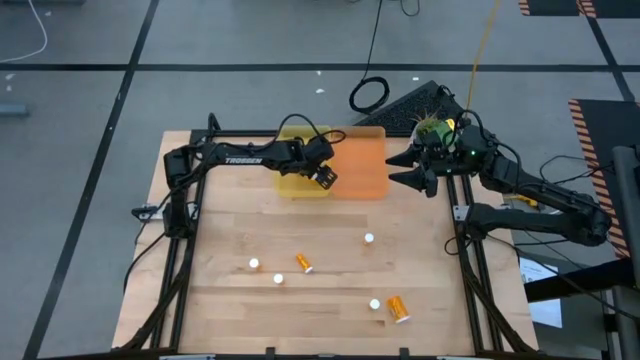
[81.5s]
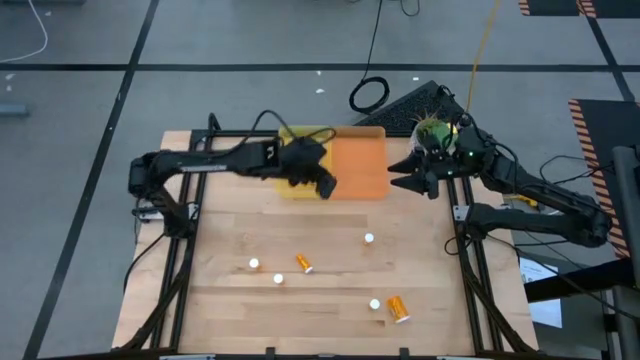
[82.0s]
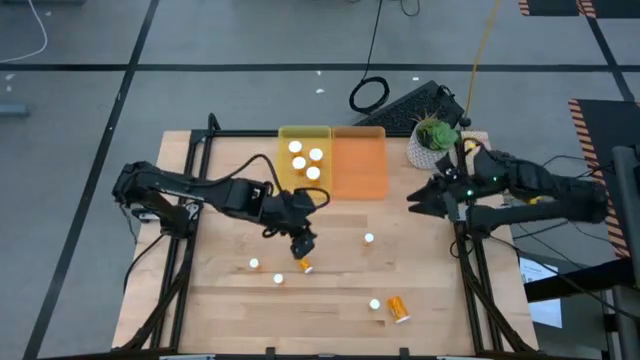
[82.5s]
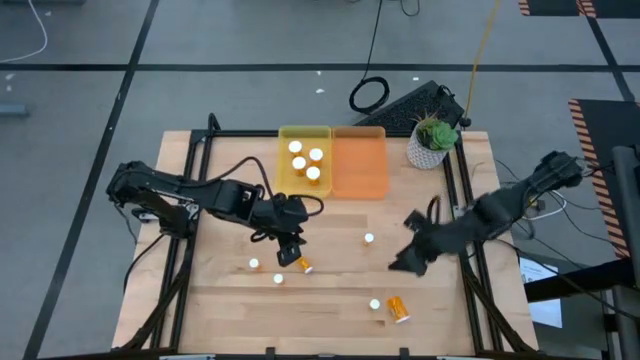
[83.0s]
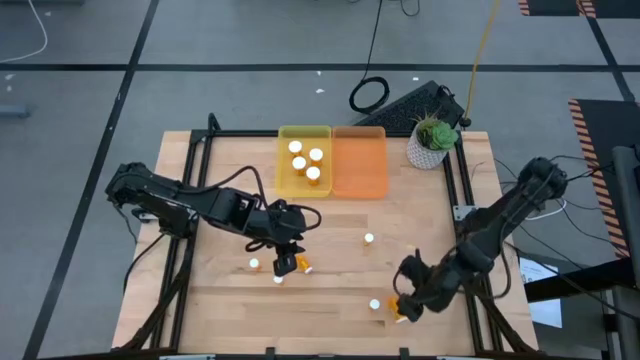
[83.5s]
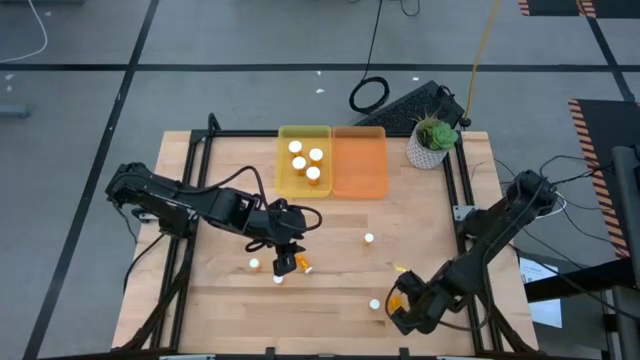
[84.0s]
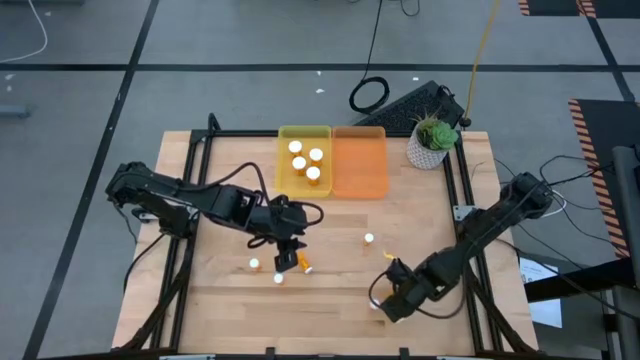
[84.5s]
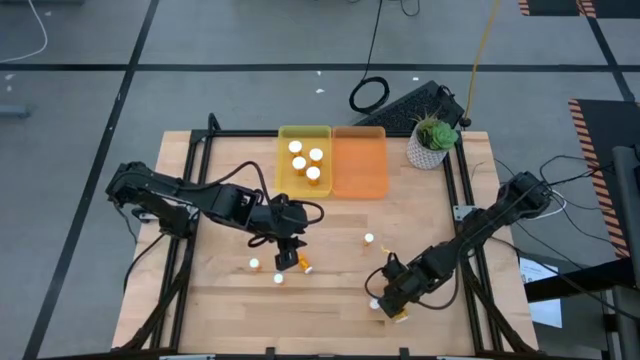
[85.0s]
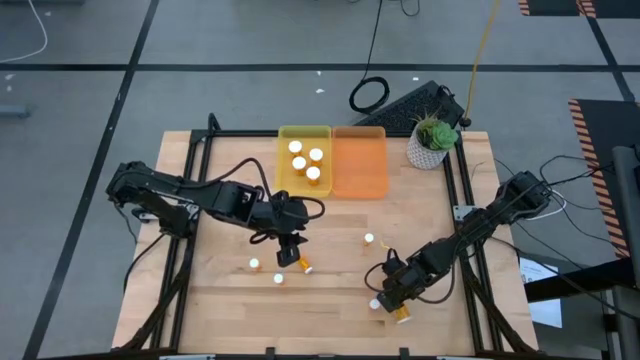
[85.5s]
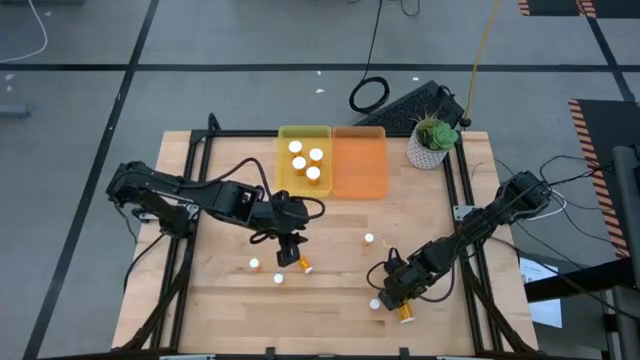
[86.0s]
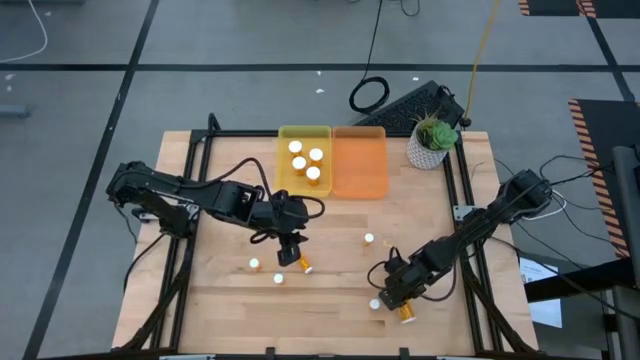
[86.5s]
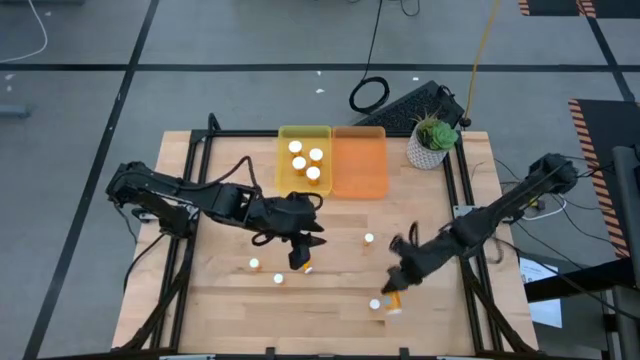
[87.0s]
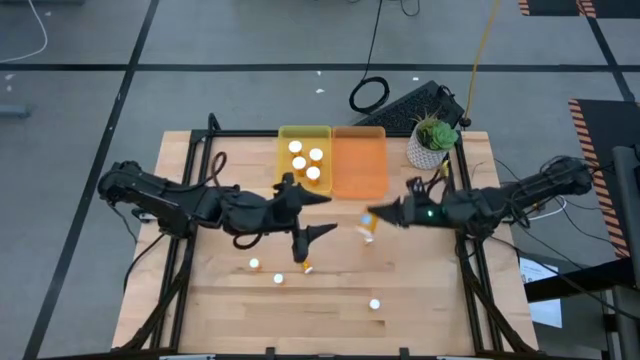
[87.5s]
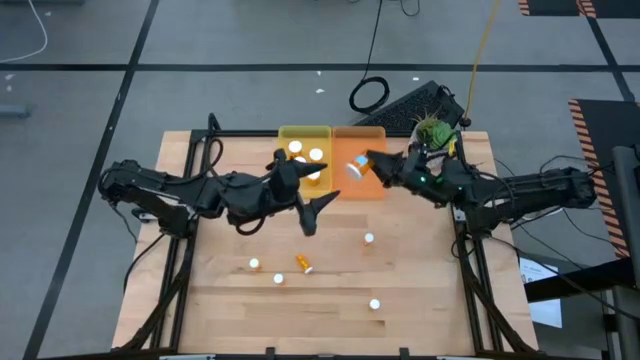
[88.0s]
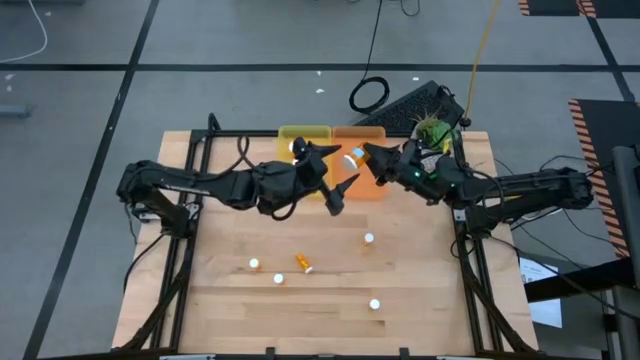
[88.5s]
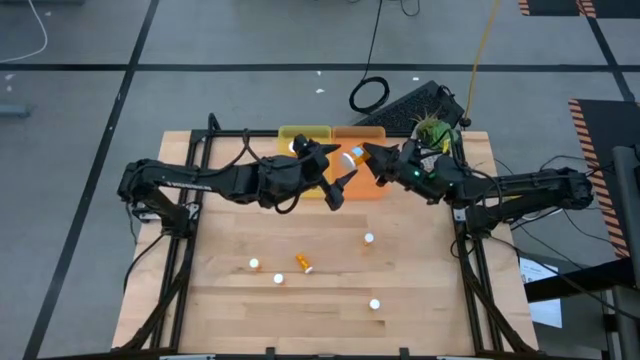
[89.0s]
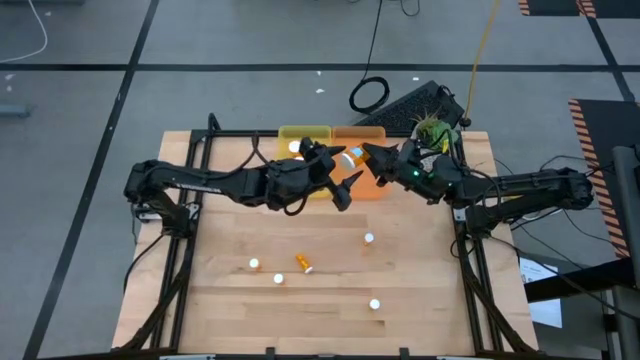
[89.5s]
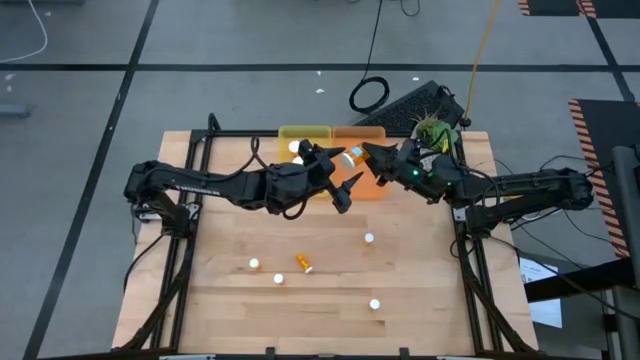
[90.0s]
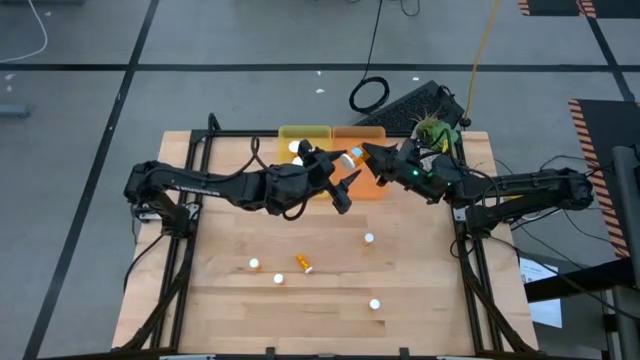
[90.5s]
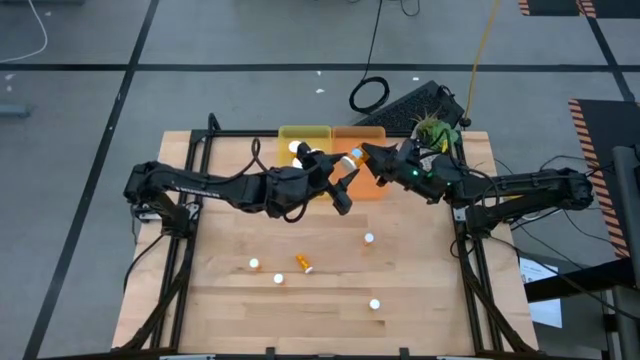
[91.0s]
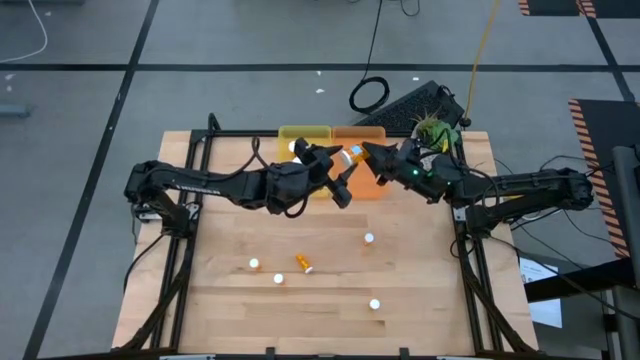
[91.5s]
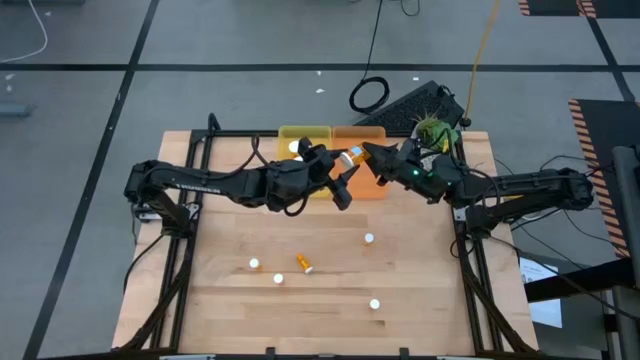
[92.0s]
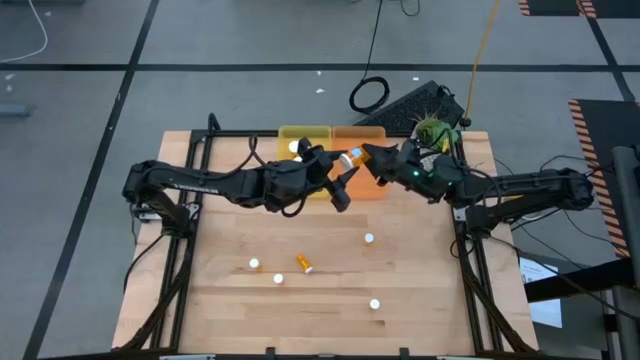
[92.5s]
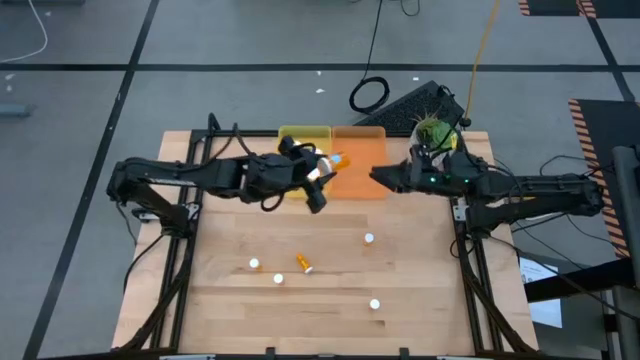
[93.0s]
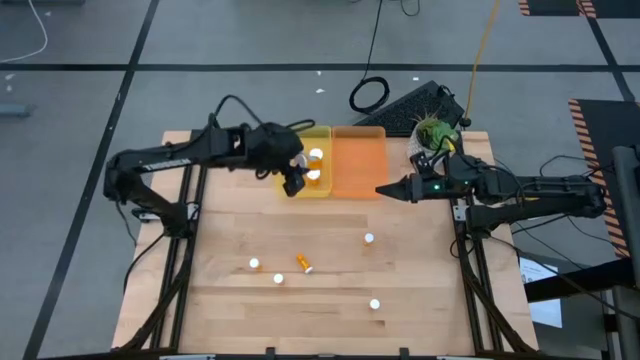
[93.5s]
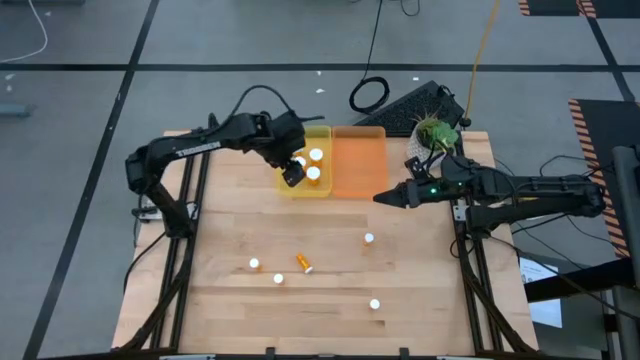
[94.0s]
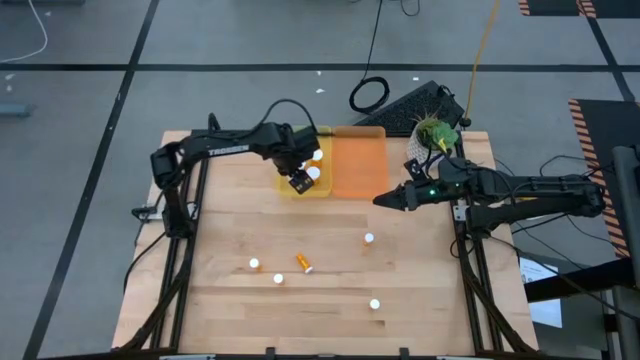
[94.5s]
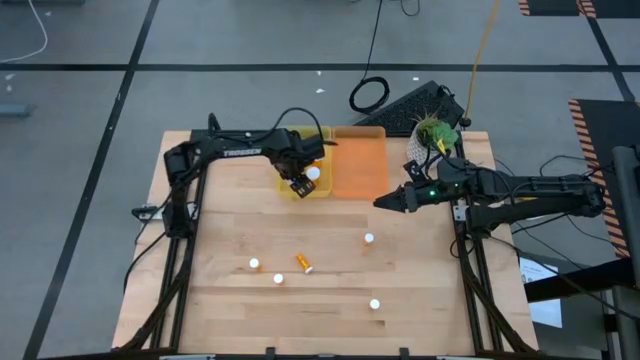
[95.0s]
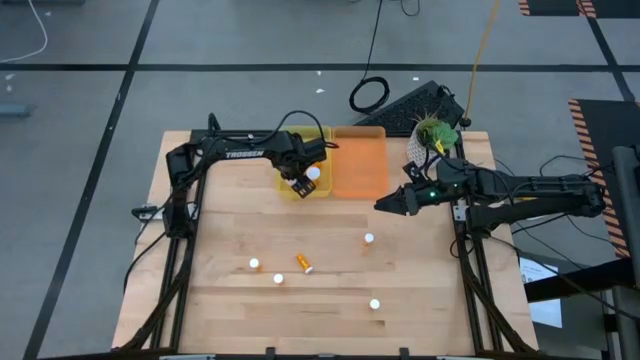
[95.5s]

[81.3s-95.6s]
Task: Pick and place medicine bottles into bin by pill shape (circle, oval)
Put the large orange capsule bottle into the yellow bin

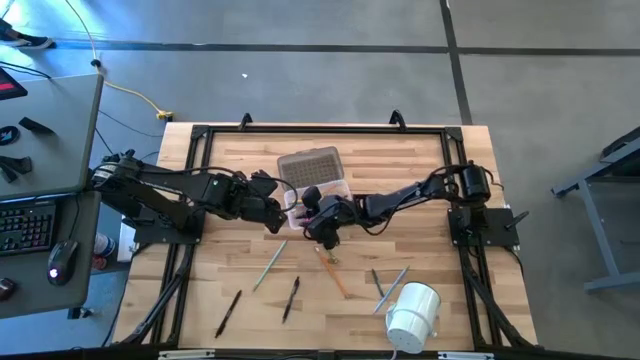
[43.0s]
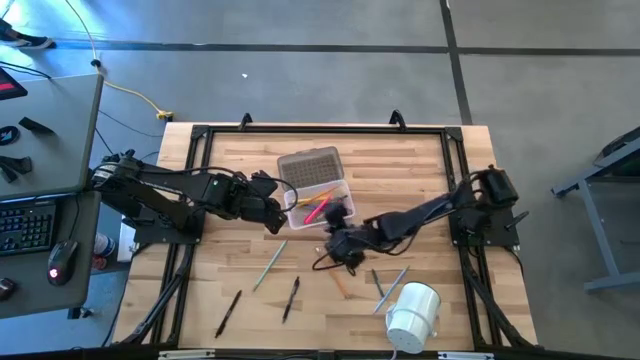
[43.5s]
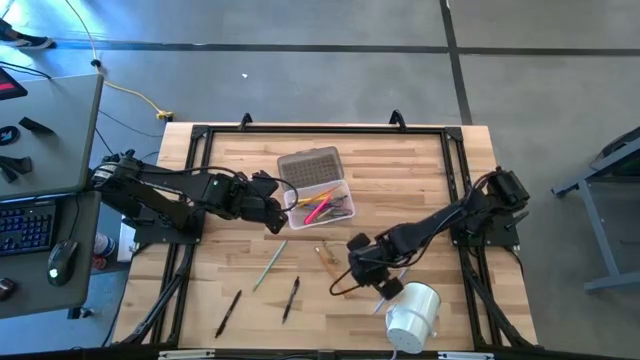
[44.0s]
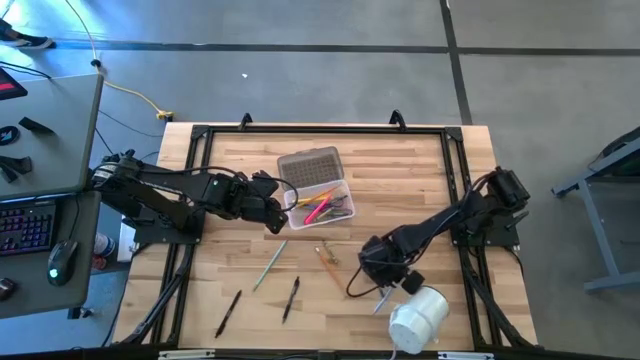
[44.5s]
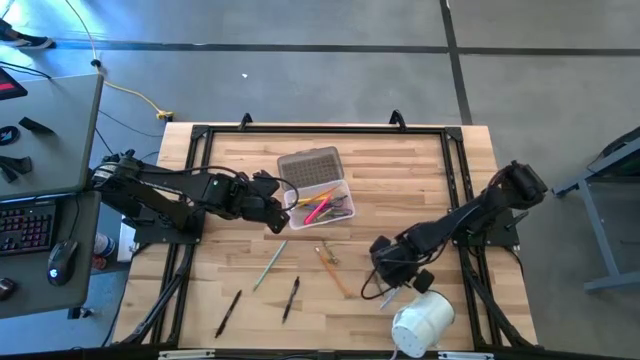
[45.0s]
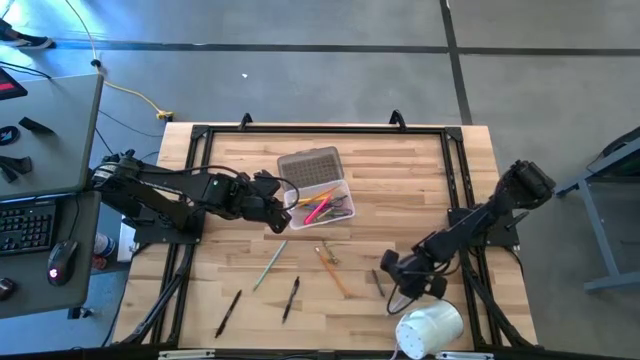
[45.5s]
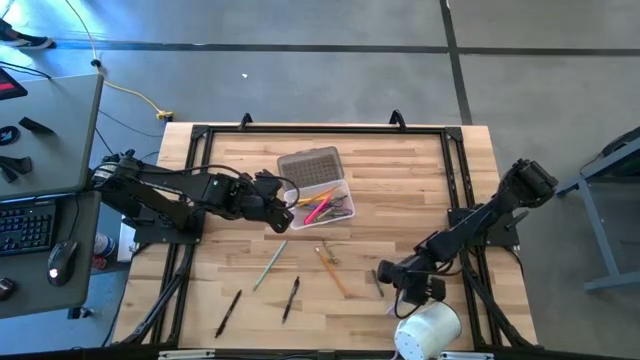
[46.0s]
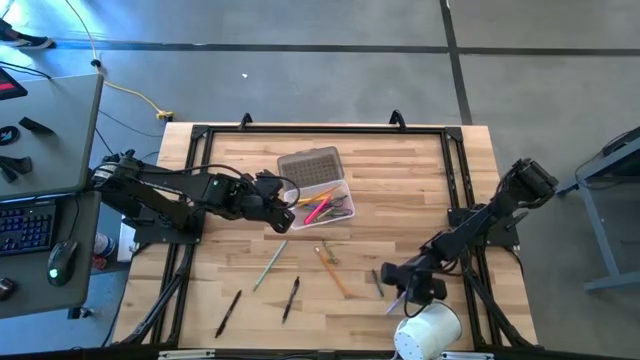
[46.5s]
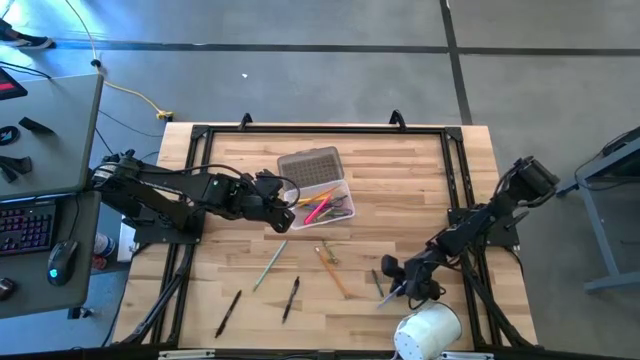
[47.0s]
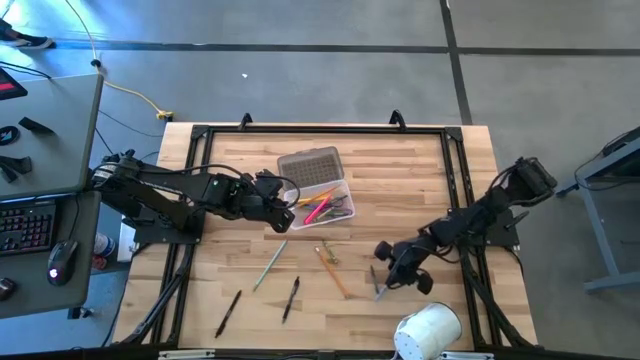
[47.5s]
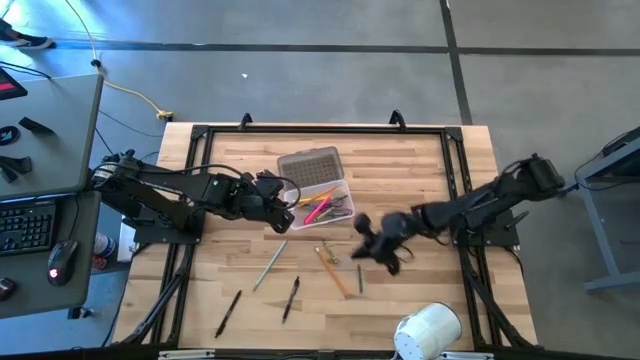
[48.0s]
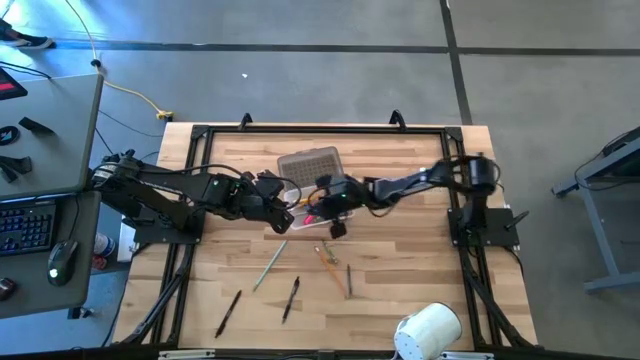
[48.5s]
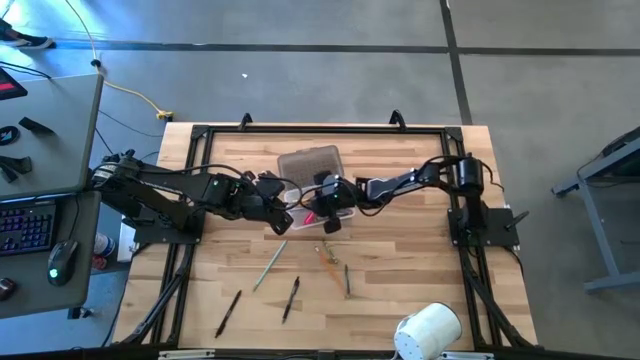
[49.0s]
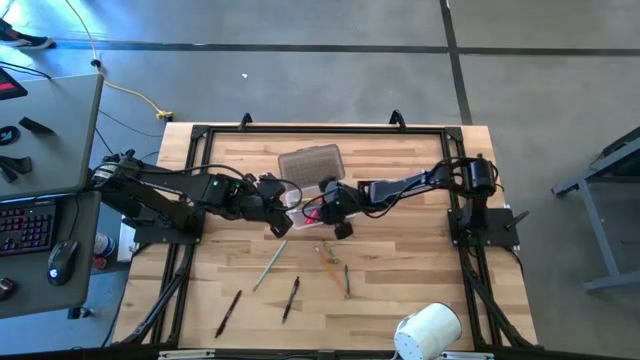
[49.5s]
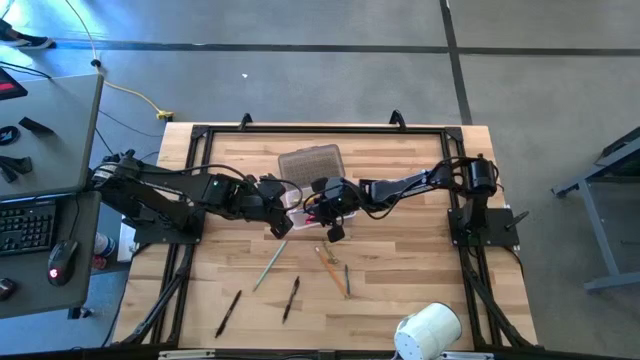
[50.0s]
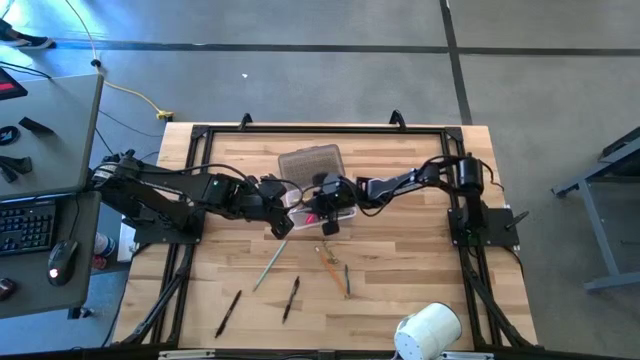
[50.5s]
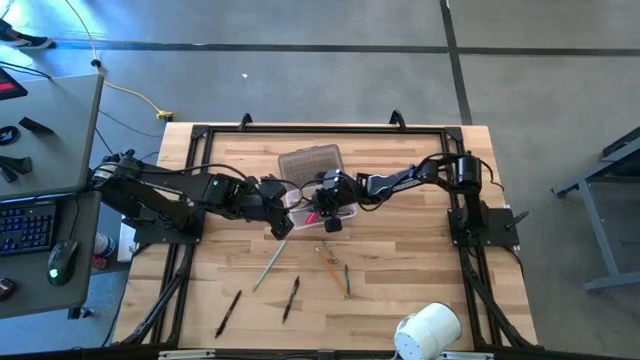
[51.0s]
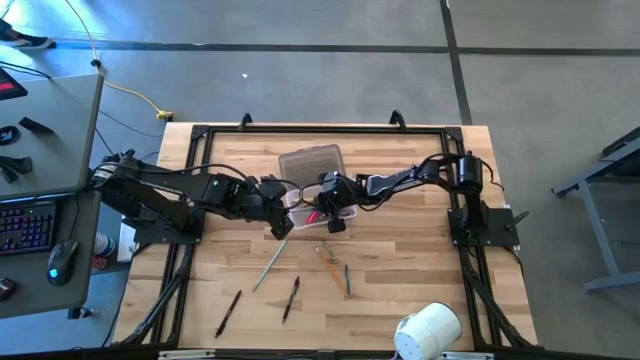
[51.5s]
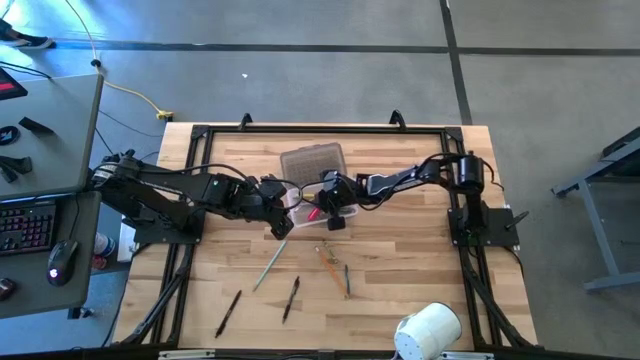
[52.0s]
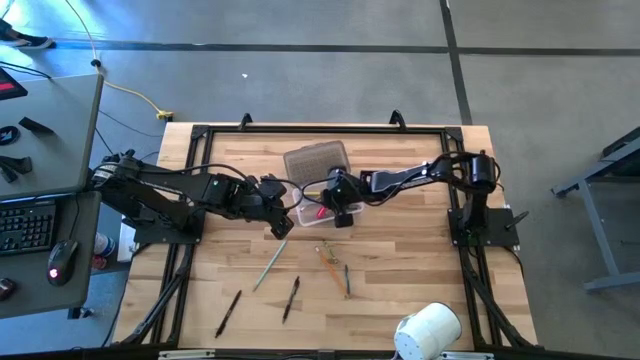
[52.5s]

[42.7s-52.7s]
Task: Pick & place school supplies into a supply box
Put the blue pencil into the supply box
